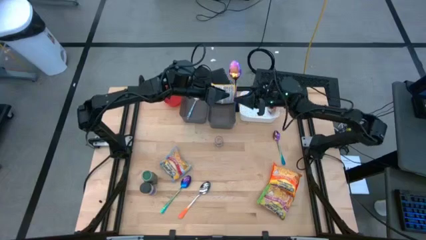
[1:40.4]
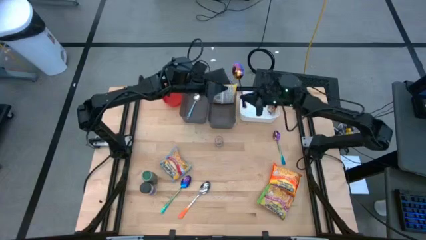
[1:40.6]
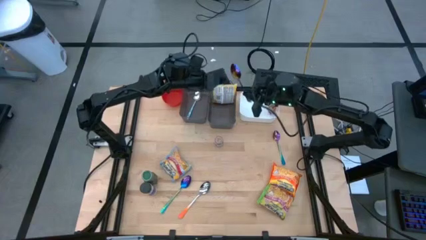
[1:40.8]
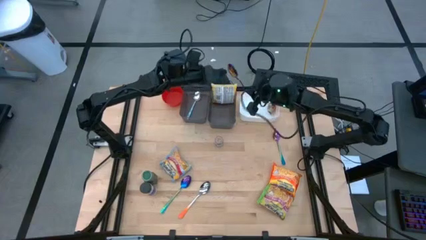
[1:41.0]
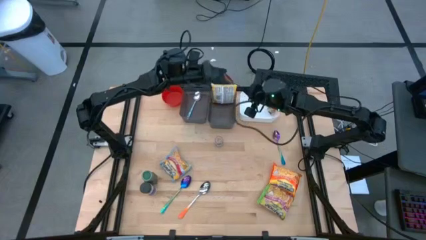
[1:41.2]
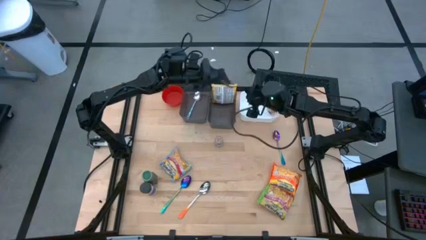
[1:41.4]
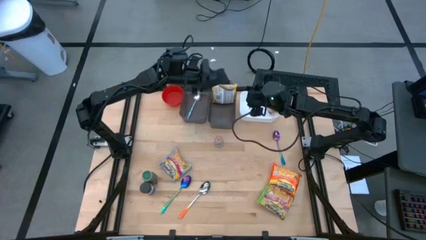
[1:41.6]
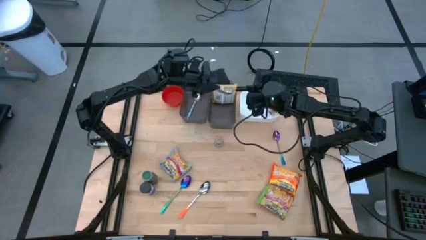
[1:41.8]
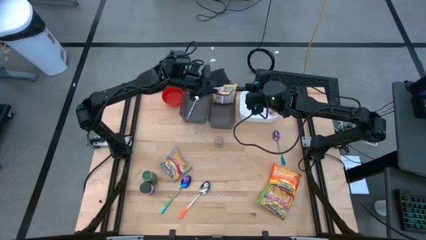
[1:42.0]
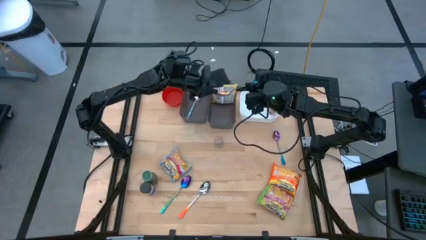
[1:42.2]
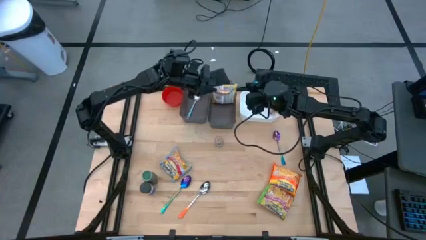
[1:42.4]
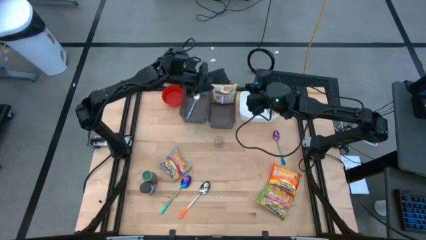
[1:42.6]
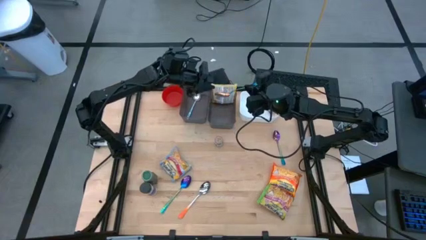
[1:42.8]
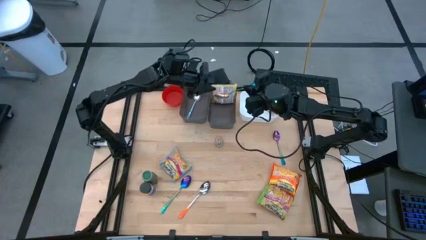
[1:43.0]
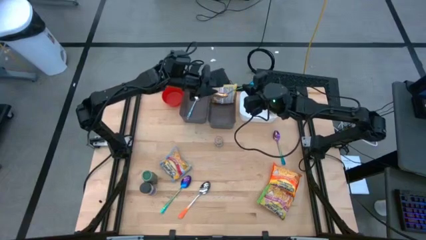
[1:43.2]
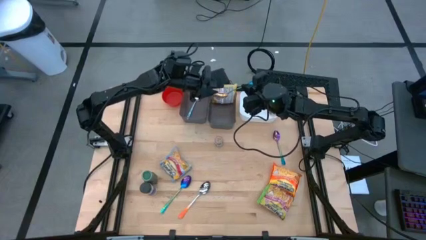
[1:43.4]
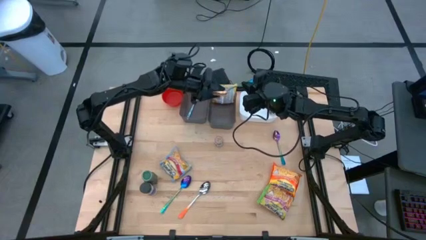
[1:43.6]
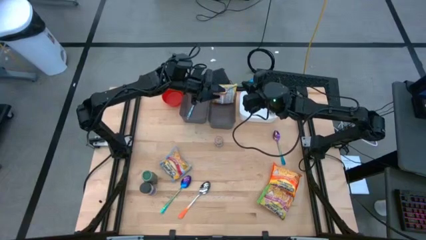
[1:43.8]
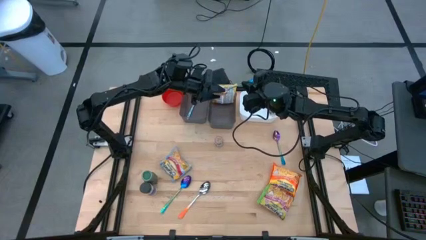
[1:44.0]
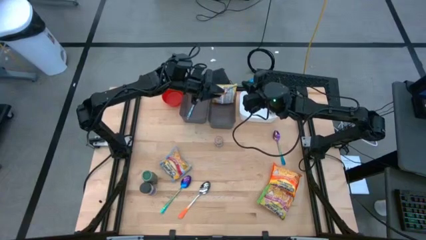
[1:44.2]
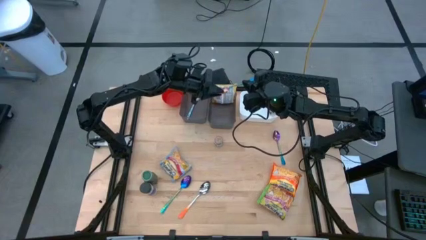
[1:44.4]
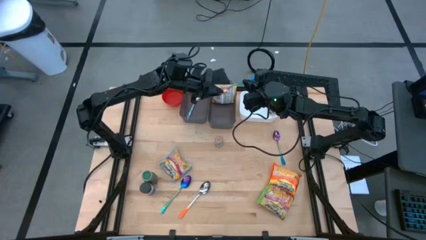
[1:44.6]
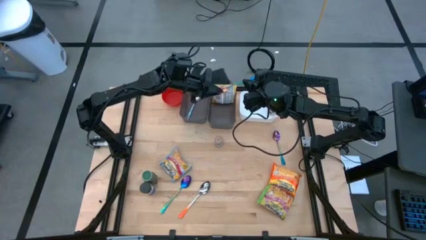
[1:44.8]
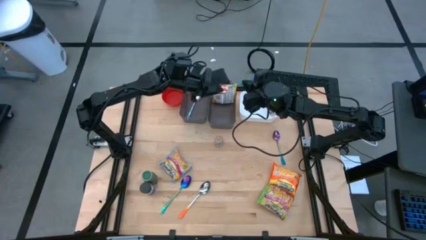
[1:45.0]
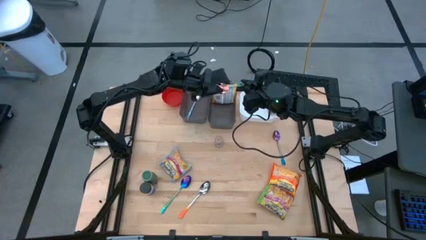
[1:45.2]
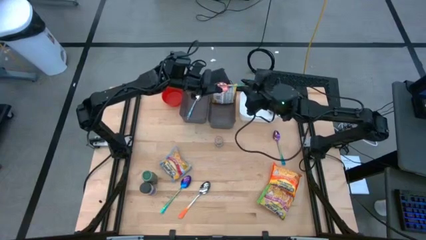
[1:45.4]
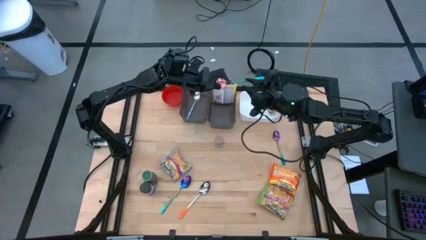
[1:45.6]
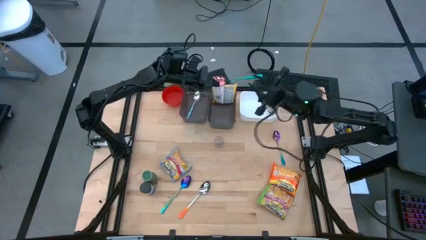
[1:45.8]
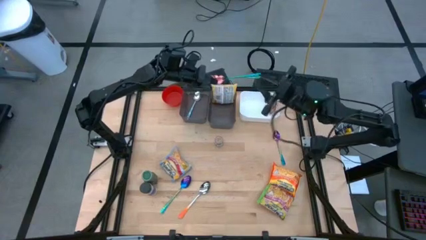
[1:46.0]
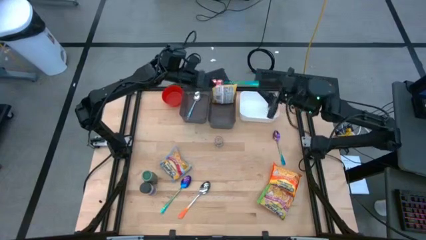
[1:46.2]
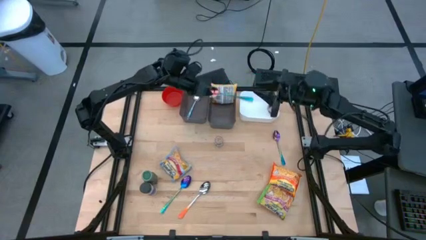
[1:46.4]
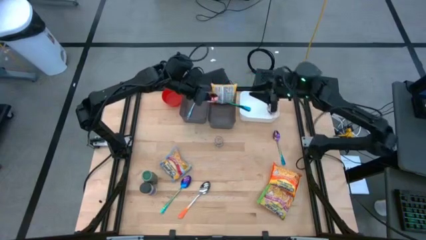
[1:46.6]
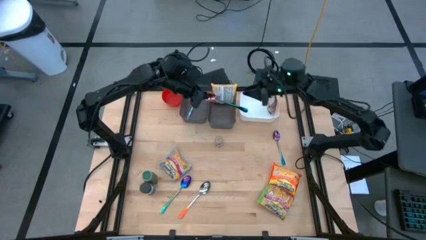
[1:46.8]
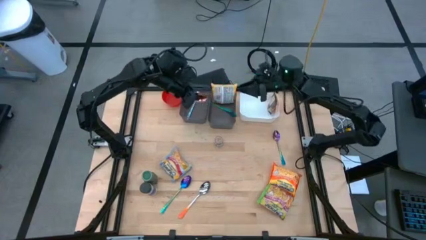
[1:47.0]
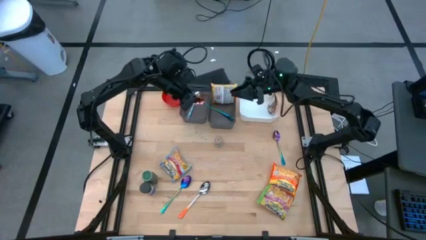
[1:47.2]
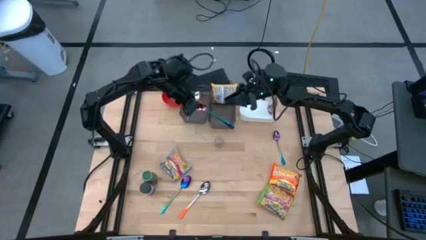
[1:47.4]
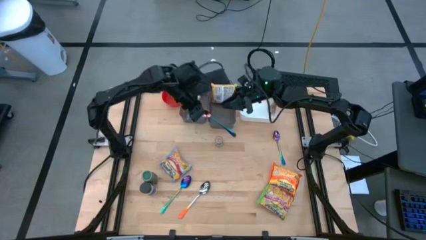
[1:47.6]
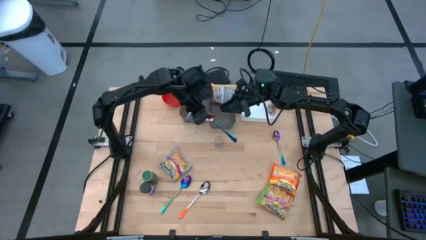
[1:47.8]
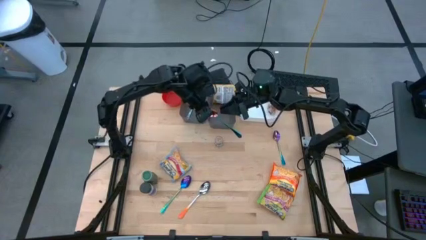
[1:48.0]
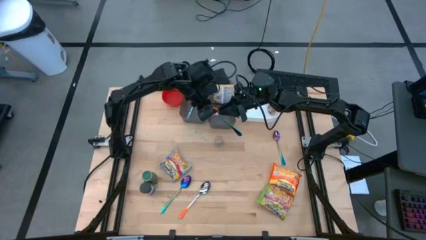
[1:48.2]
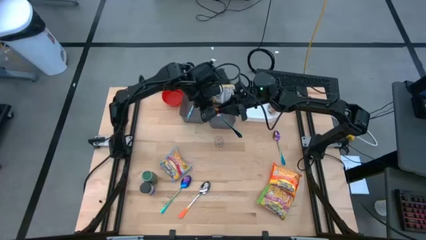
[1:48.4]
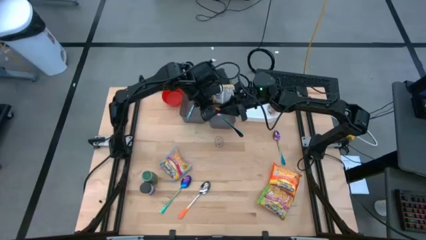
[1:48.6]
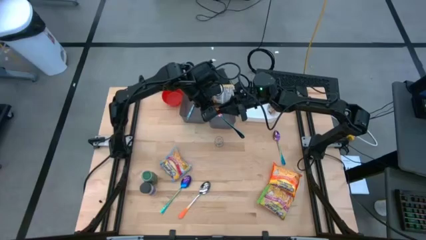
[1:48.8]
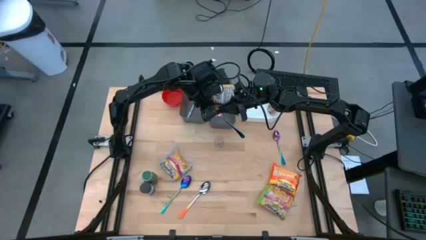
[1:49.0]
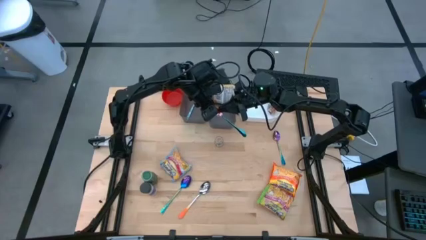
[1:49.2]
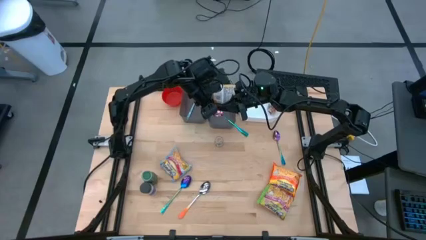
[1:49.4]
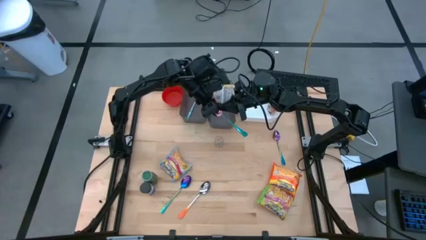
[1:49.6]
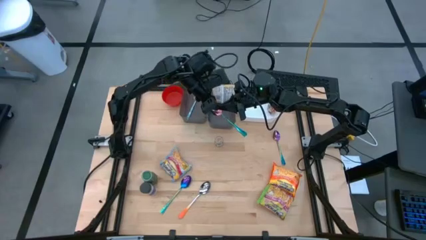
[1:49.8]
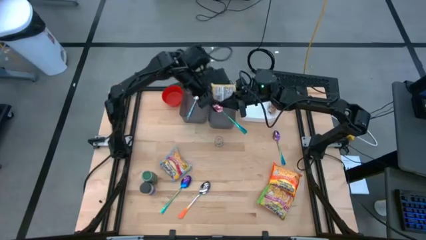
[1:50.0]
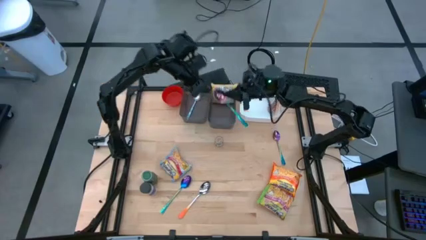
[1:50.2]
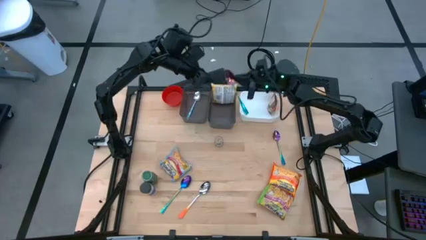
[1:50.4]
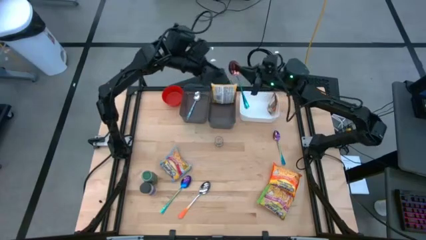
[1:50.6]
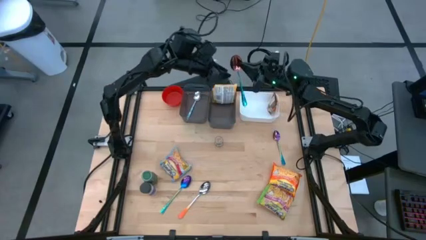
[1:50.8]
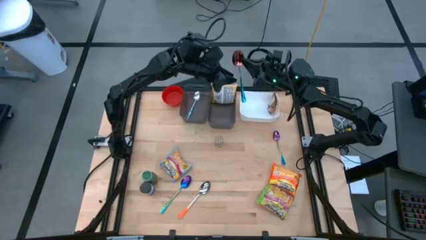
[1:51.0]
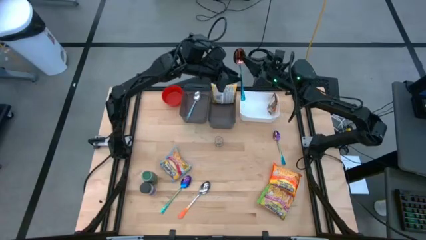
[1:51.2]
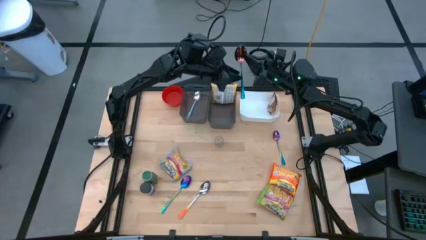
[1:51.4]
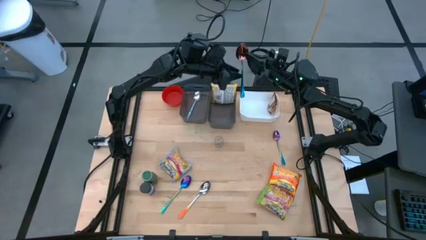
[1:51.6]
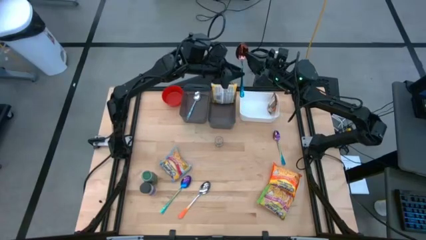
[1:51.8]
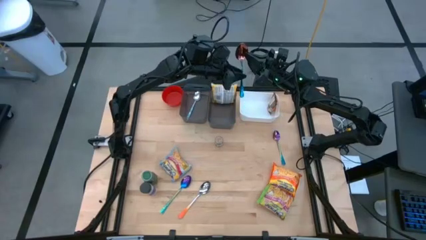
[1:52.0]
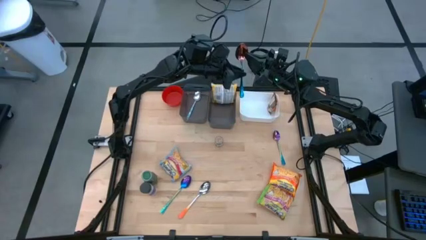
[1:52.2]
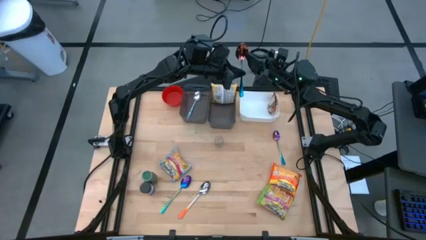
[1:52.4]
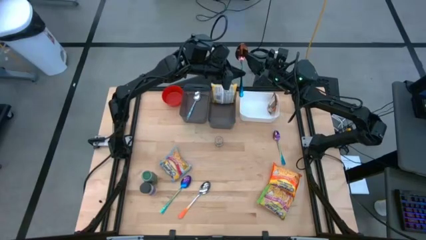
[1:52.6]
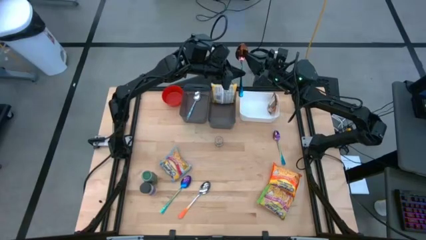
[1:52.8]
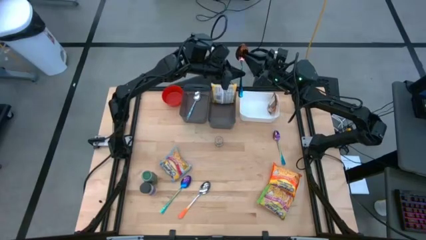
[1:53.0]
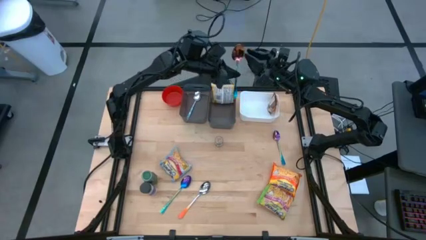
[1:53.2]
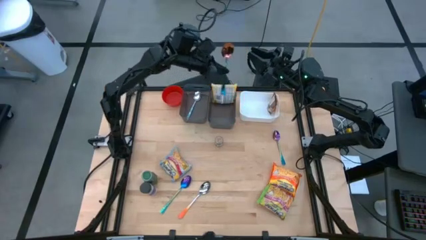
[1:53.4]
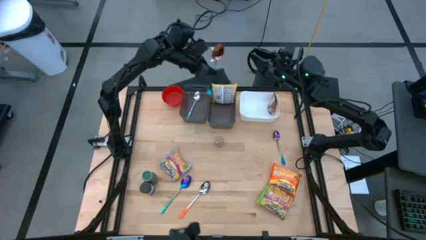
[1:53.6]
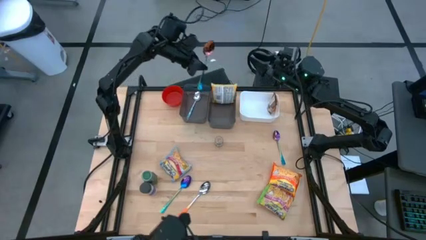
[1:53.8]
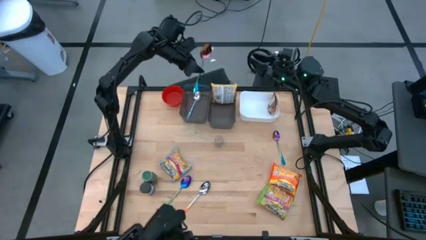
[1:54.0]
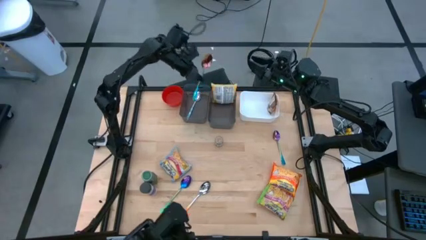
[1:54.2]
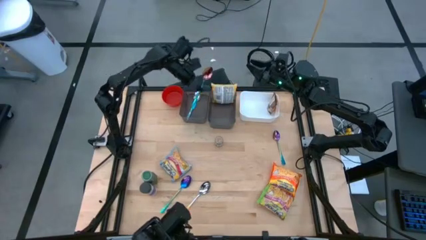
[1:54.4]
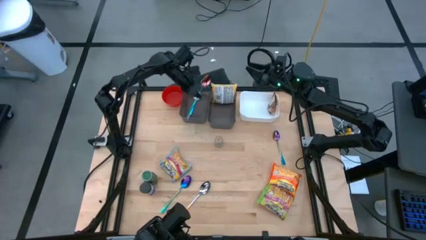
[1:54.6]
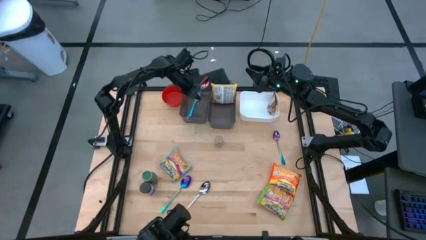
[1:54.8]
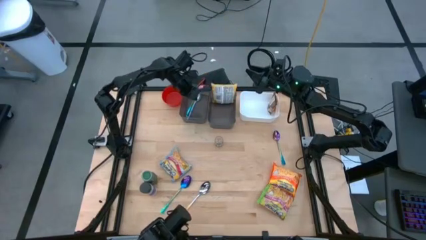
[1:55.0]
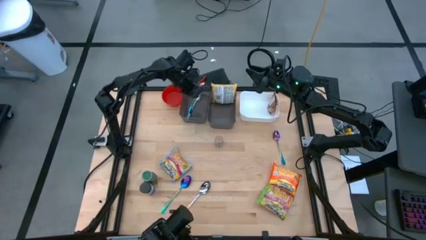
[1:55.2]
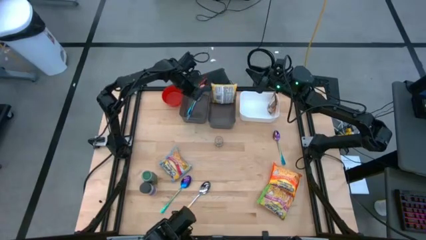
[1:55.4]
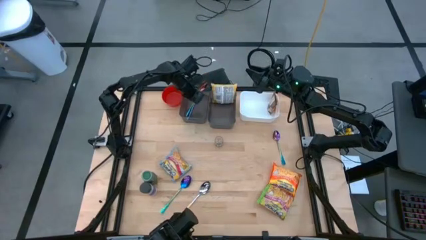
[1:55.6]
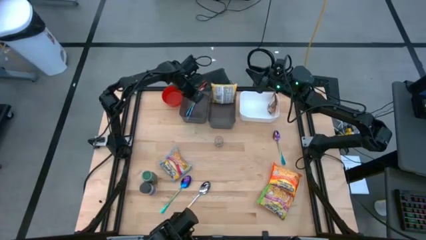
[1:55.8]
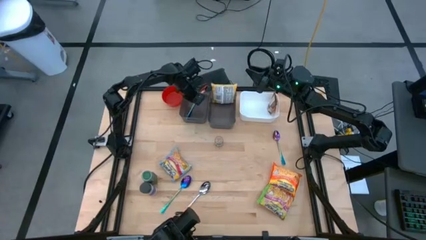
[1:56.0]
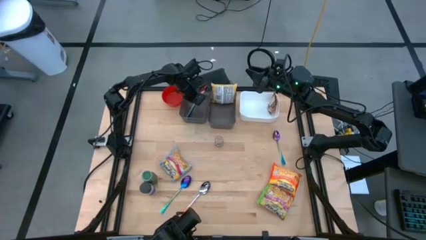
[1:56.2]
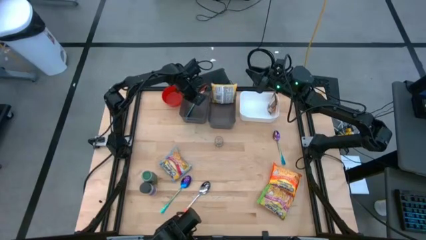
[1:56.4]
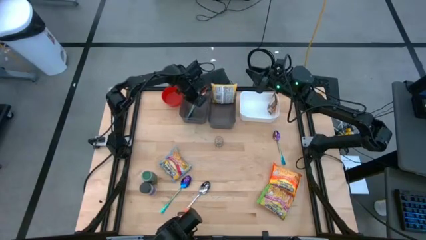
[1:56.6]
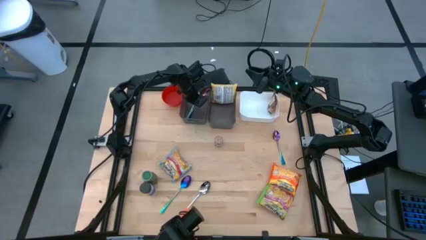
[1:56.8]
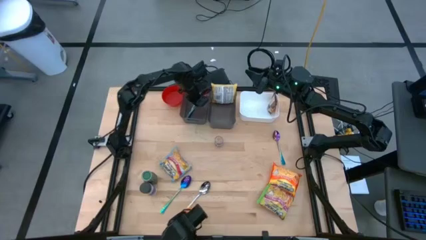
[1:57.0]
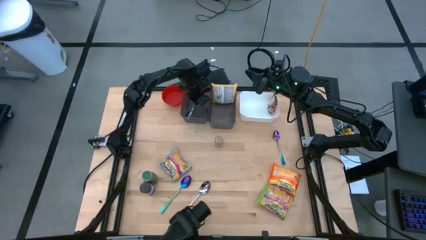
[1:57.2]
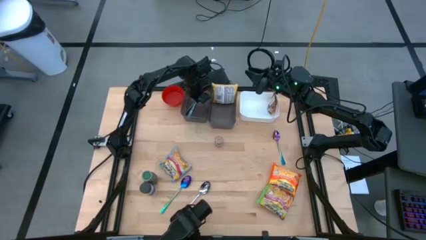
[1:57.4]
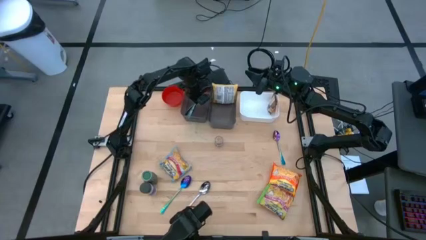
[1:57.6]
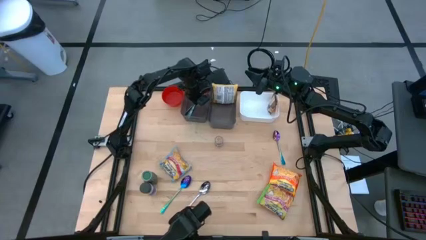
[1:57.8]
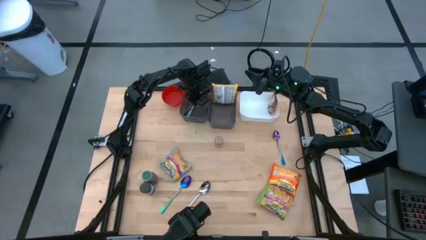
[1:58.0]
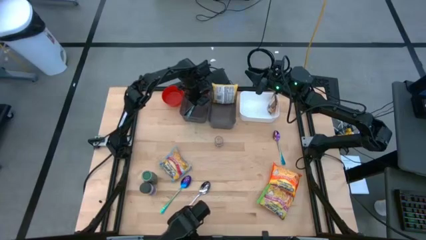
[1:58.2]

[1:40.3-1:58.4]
Task: Pick & Place Food Item
Put the top left purple and blue spoon into the left black bin
